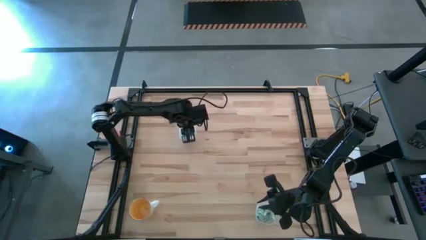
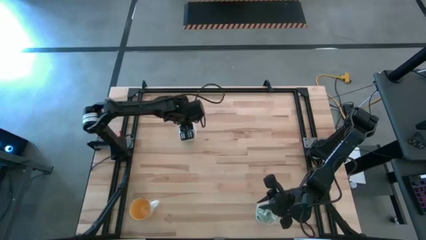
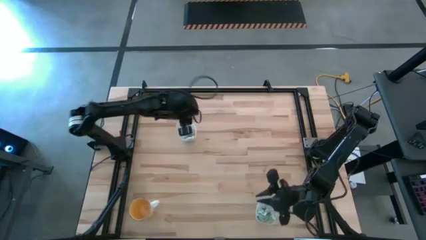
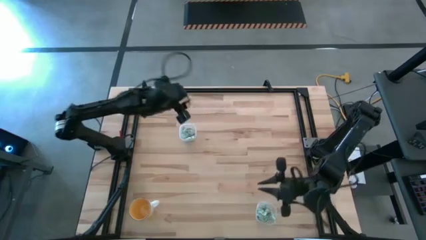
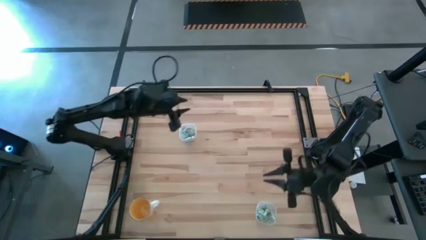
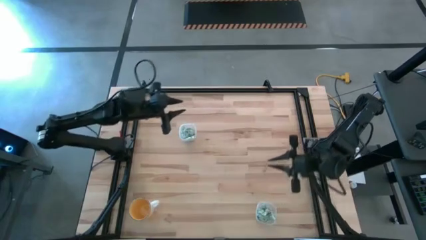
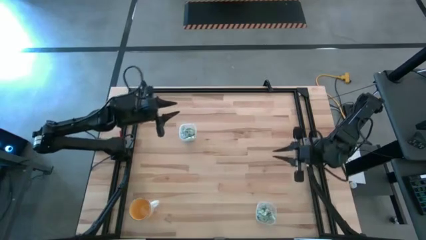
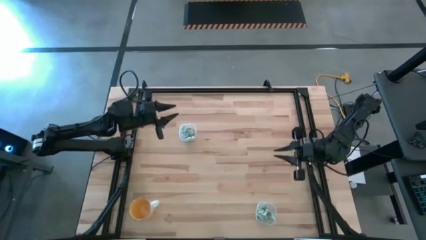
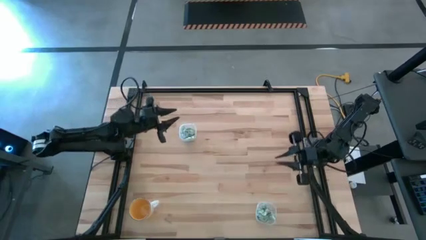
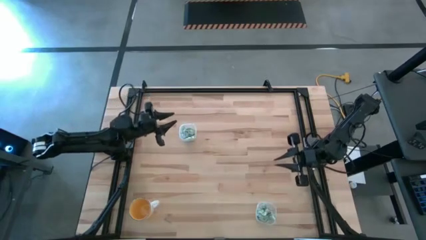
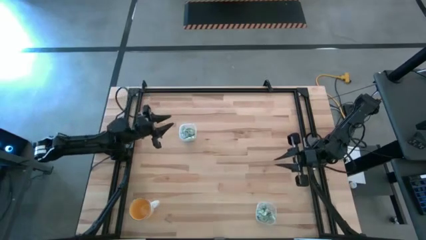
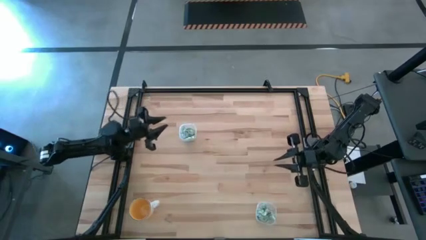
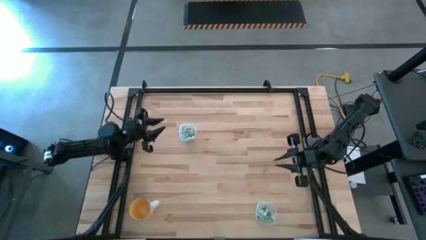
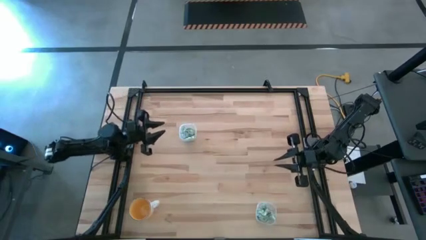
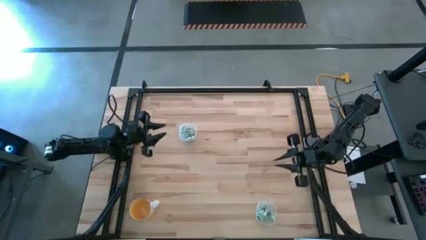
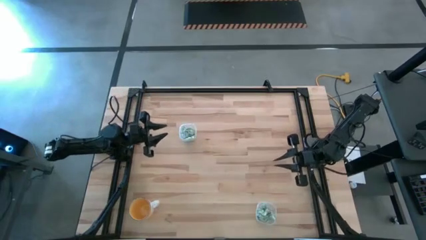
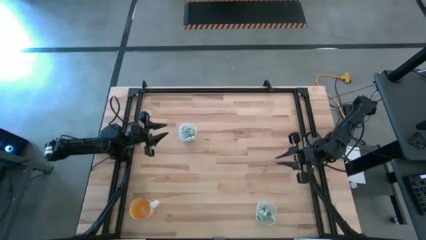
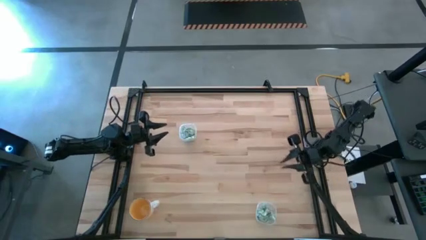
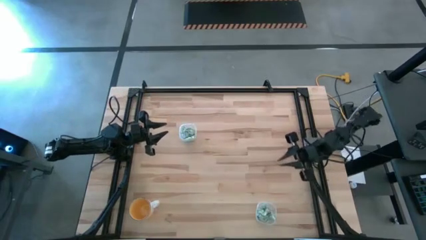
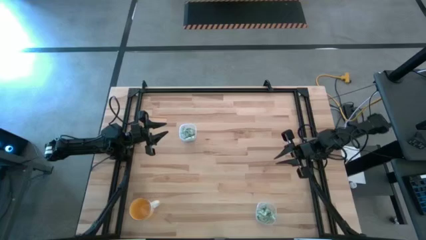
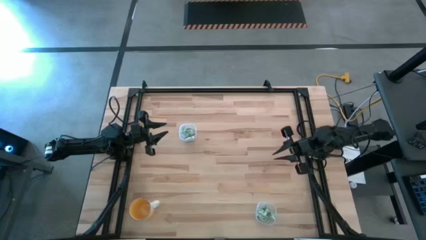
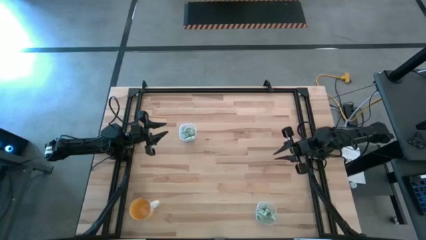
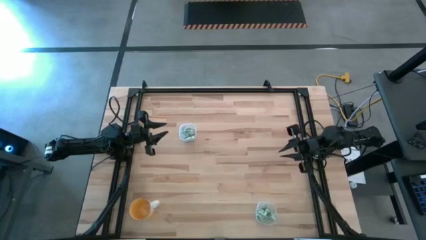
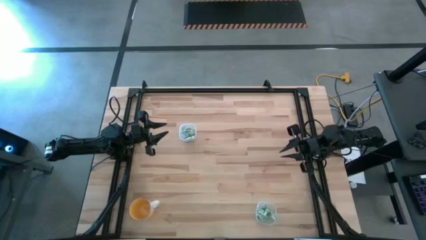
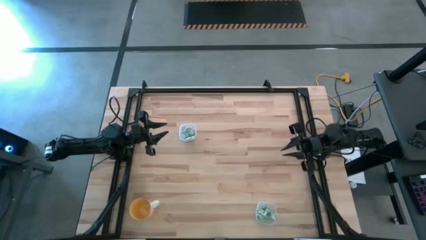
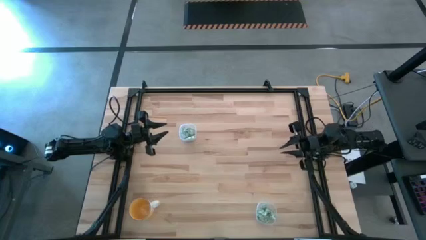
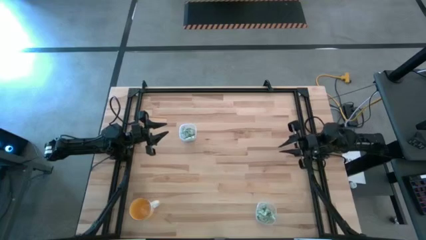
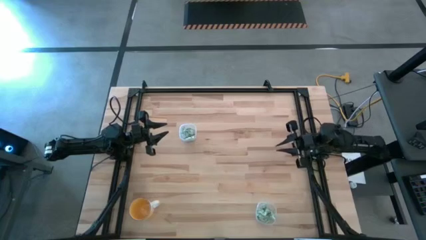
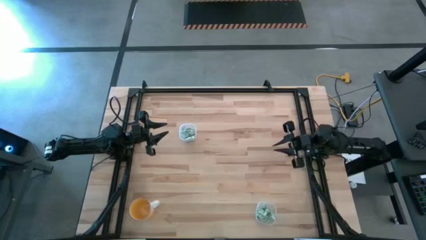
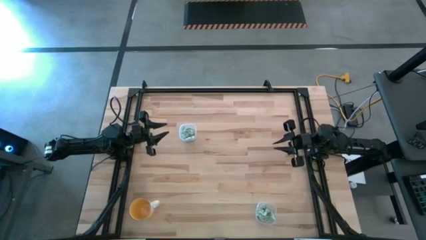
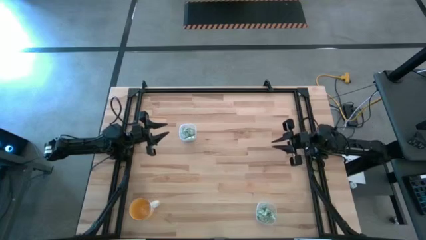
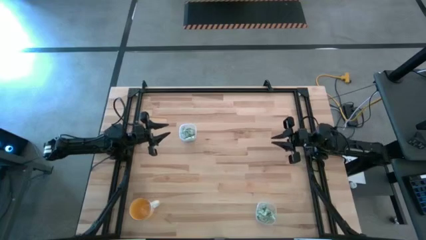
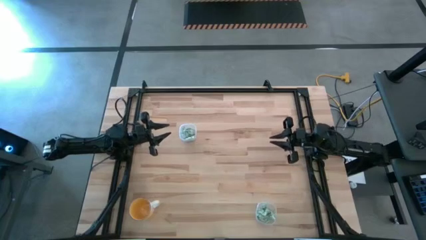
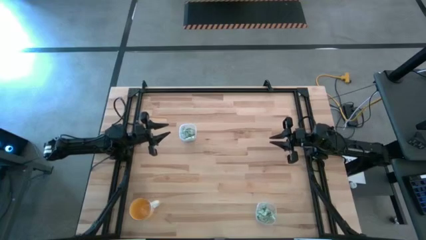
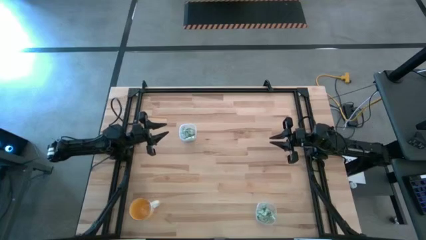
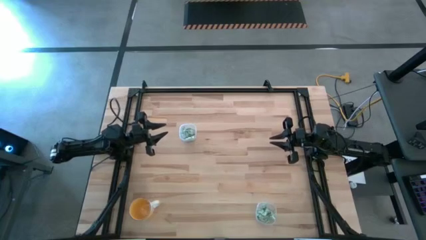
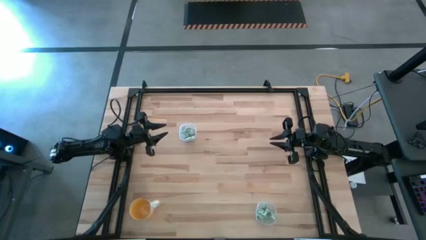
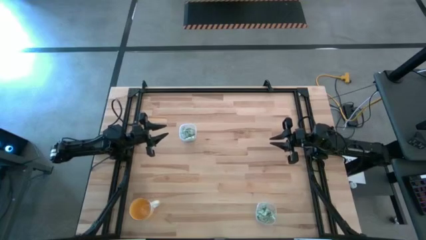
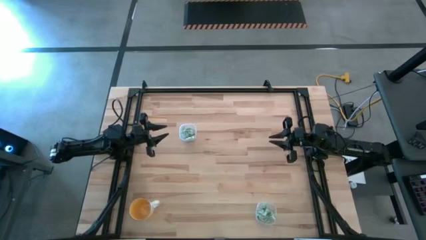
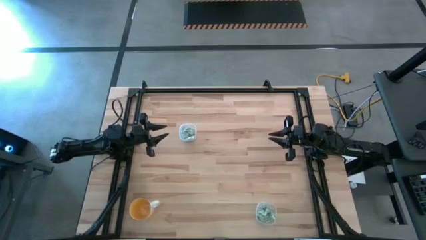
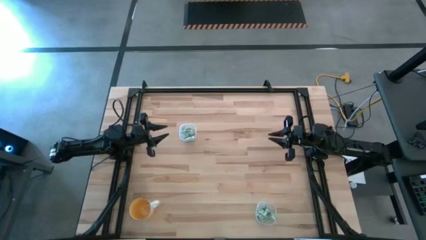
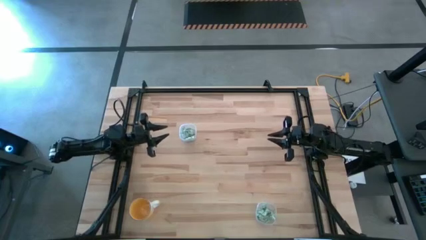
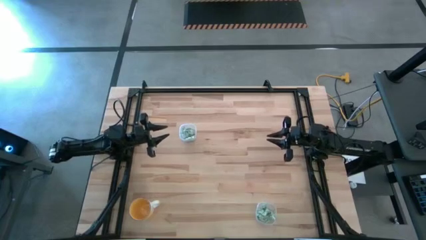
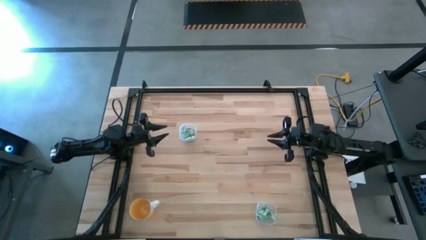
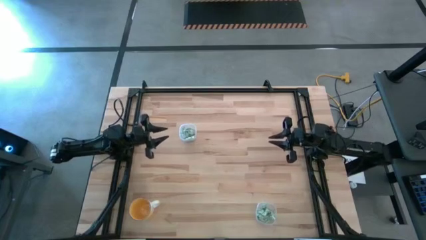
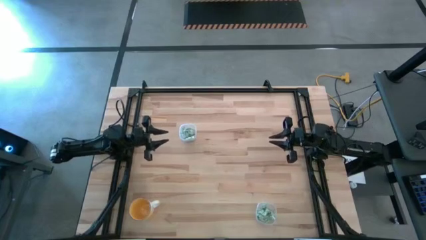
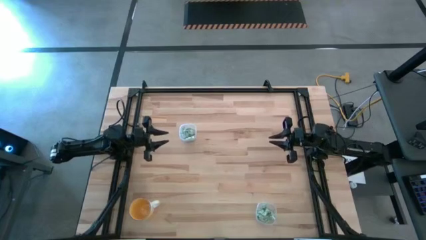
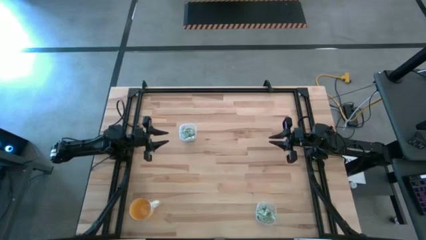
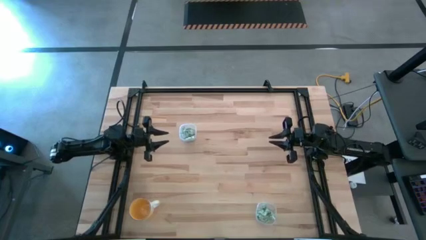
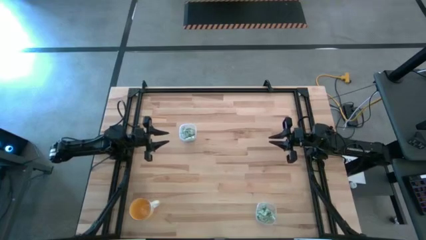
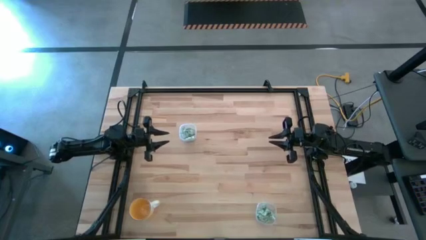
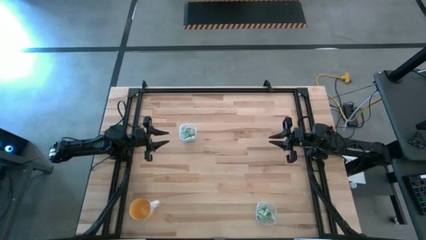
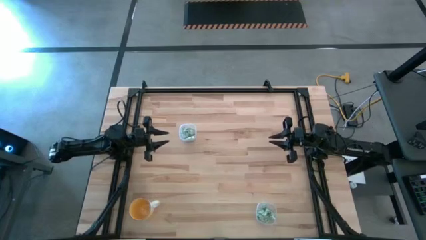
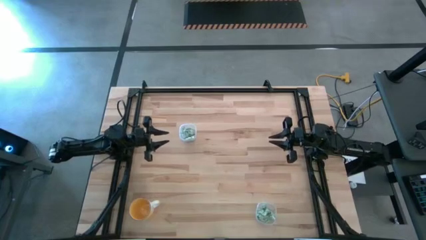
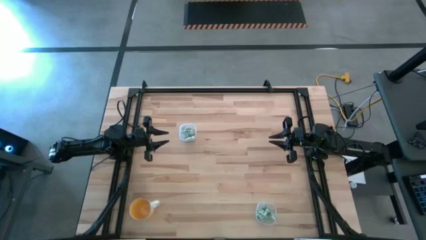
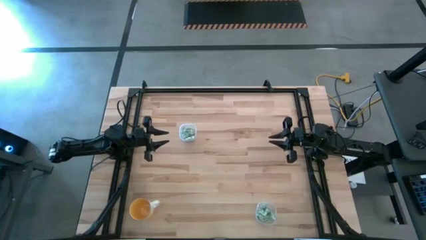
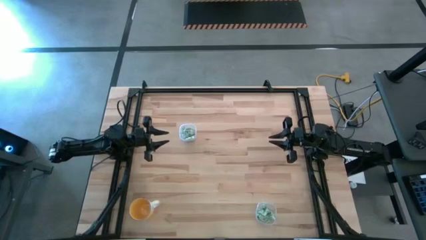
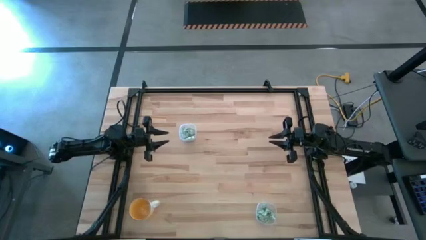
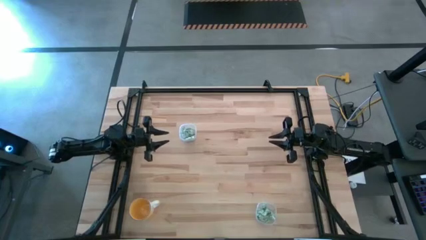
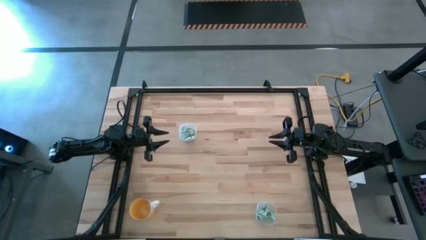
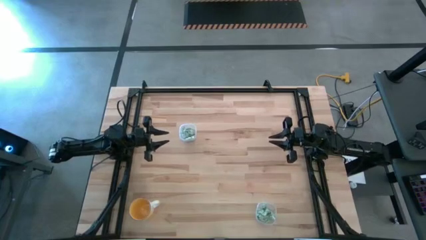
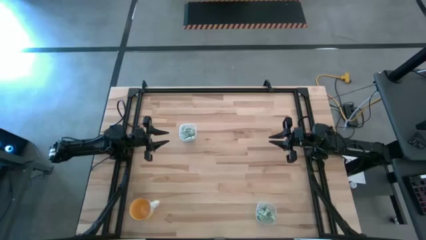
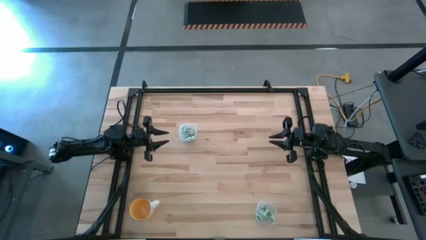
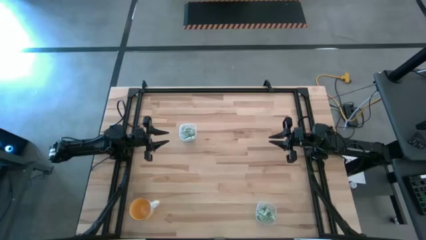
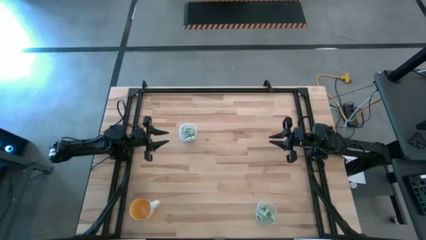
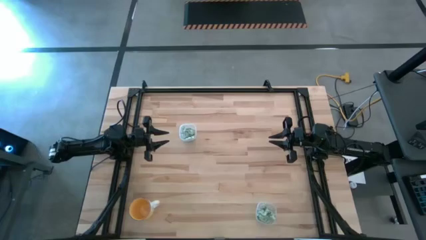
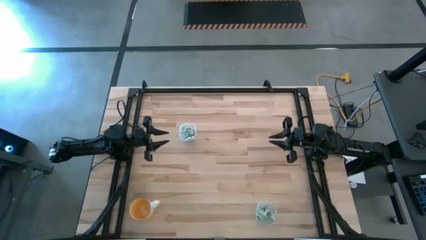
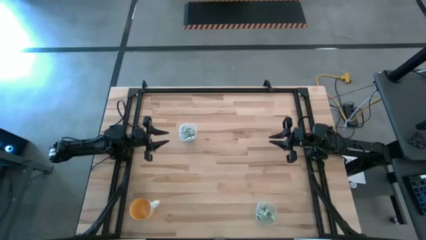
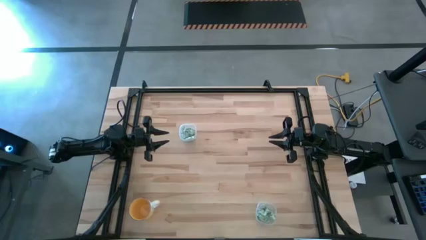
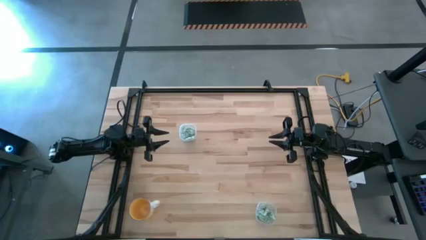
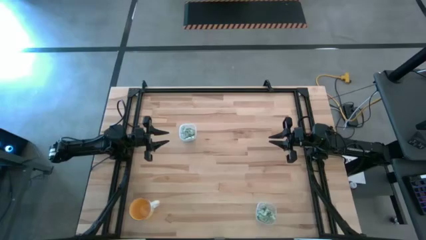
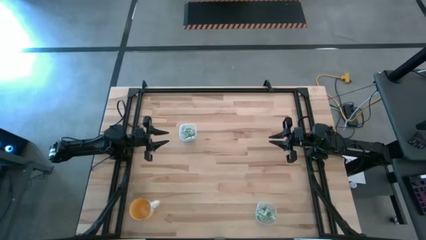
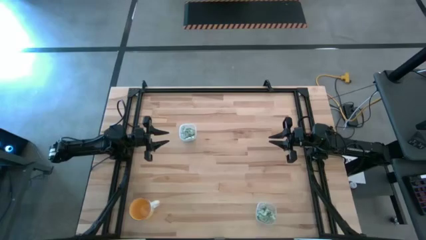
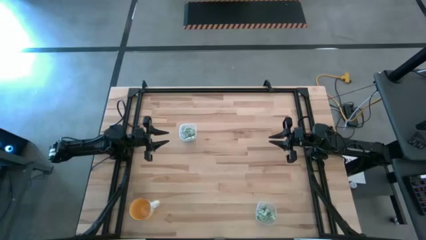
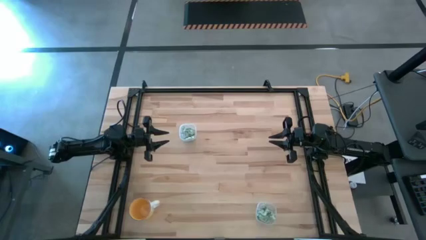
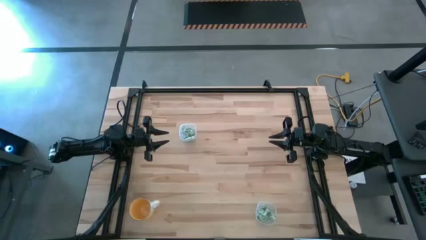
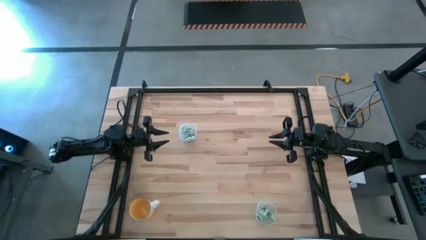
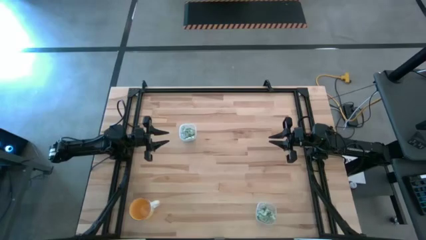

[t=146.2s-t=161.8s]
Task: Pick and place Stevia / Truvia into bins
Return to Home Position

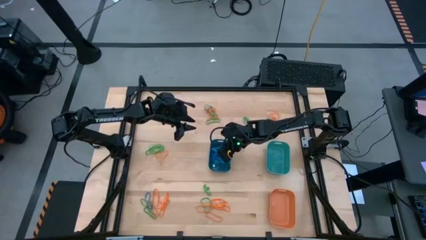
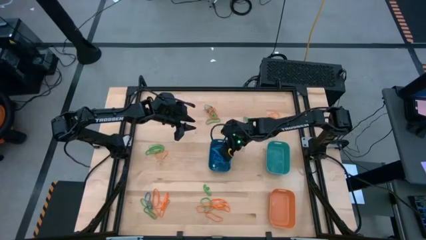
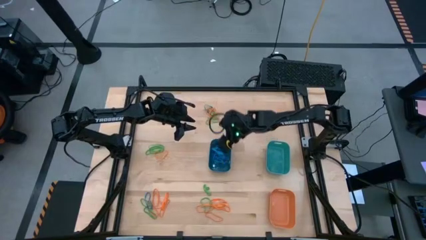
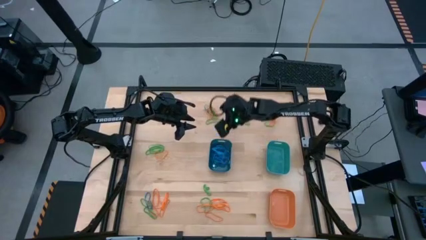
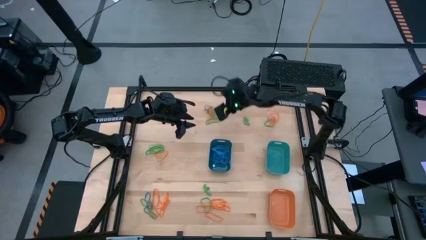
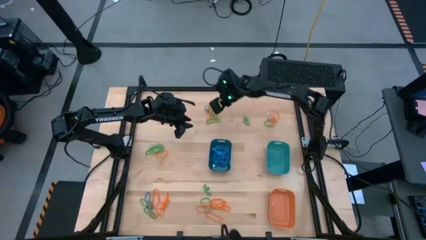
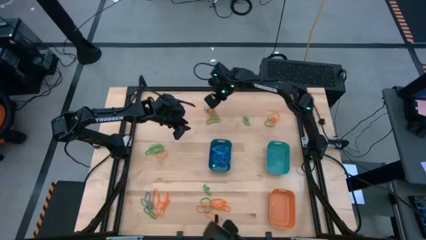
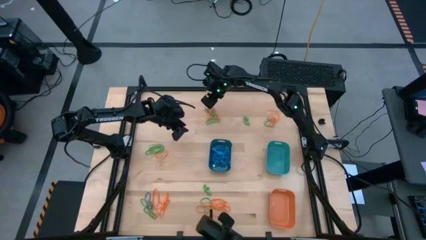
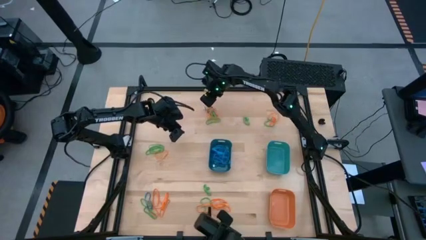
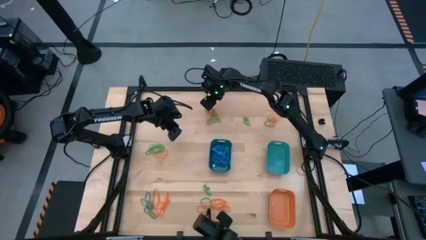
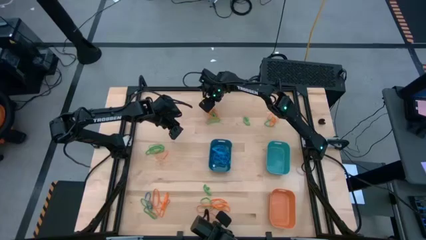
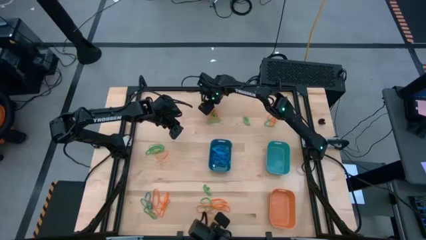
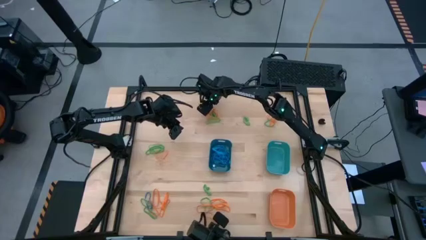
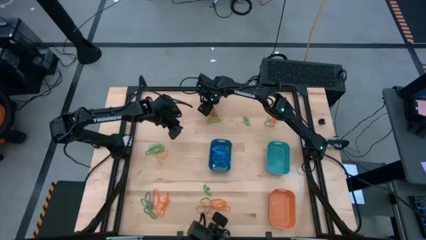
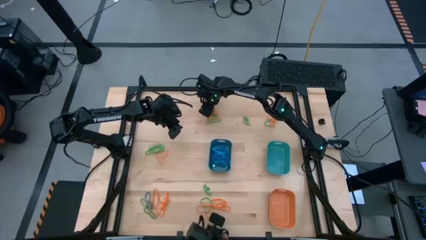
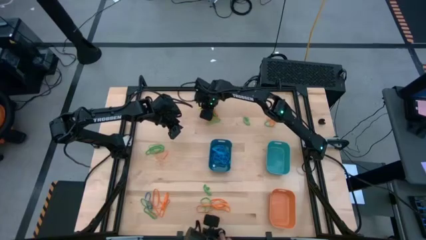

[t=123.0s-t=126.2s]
Task: Sort rubber bands into baskets
Put the blue rubberband into the blue bin
